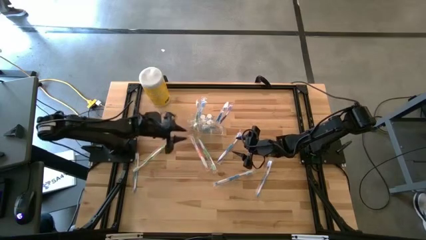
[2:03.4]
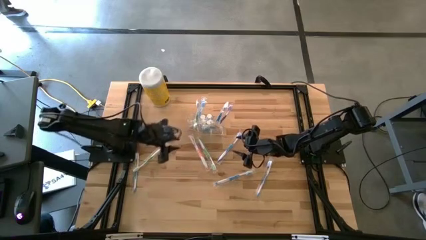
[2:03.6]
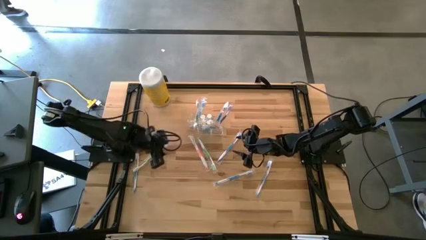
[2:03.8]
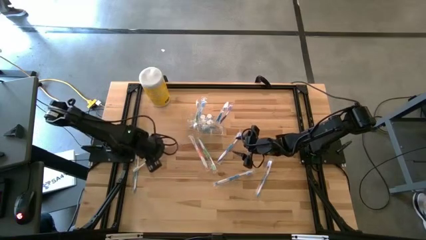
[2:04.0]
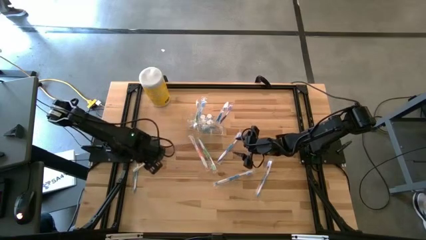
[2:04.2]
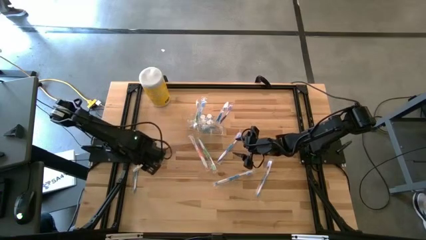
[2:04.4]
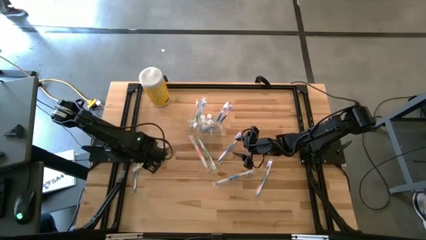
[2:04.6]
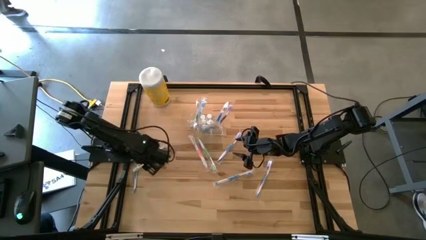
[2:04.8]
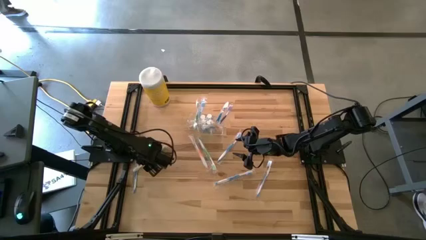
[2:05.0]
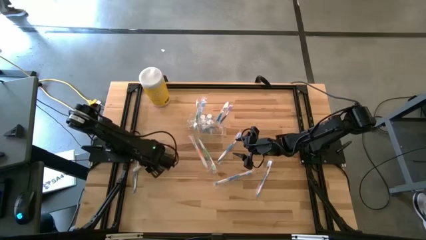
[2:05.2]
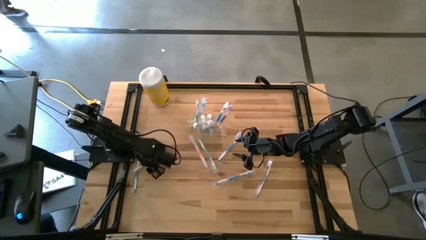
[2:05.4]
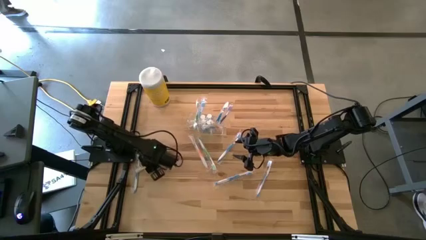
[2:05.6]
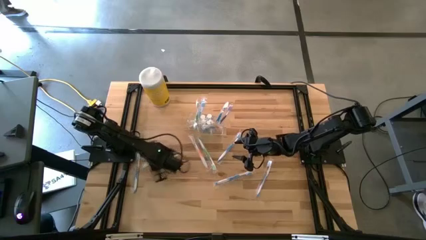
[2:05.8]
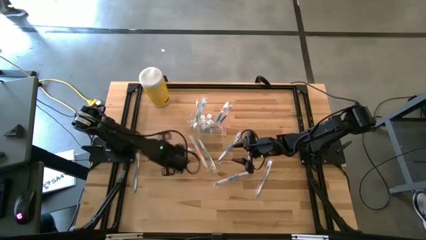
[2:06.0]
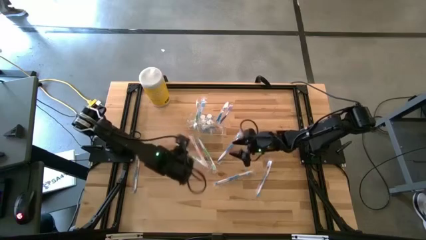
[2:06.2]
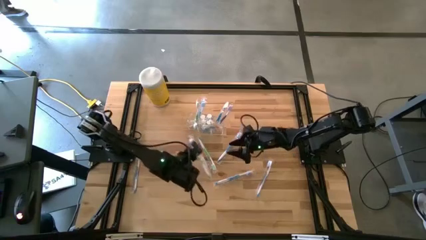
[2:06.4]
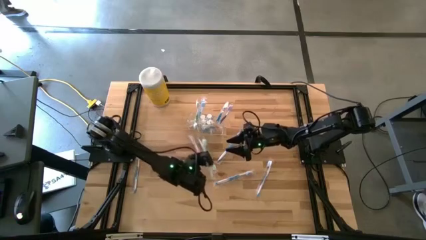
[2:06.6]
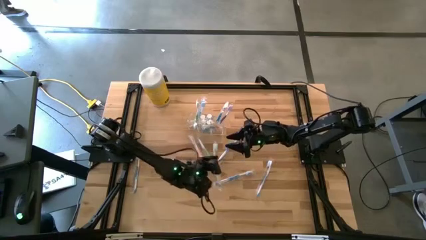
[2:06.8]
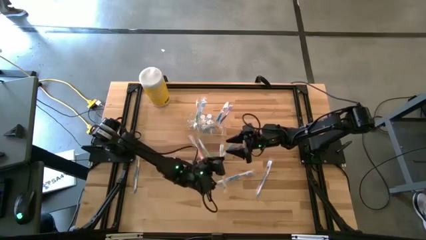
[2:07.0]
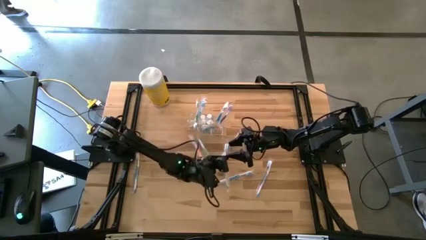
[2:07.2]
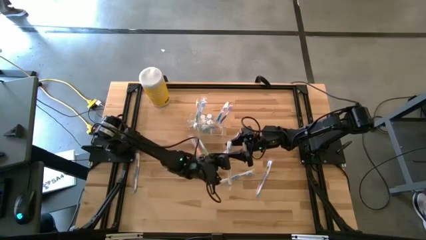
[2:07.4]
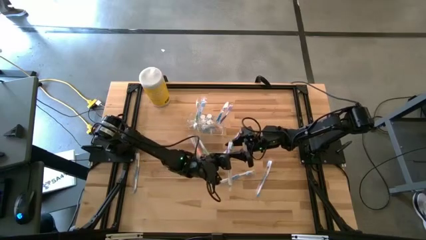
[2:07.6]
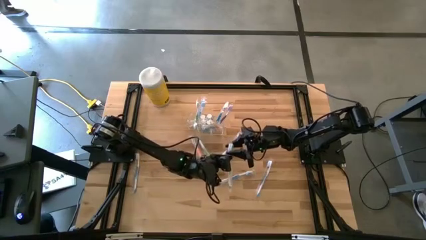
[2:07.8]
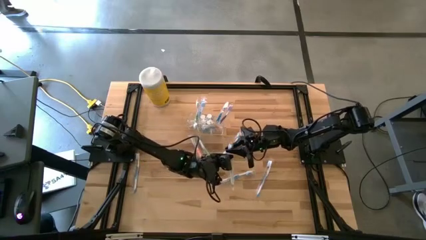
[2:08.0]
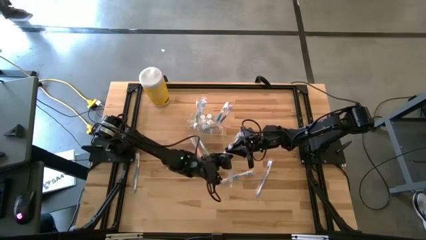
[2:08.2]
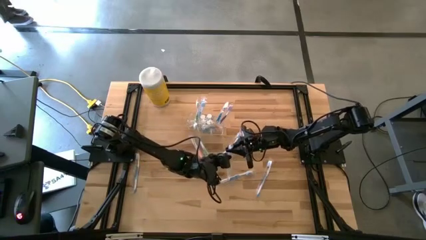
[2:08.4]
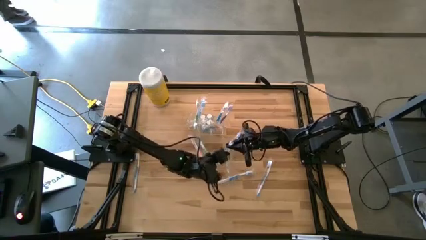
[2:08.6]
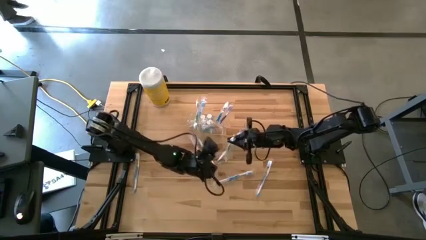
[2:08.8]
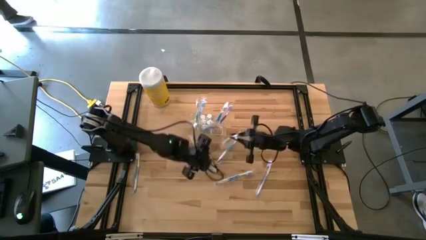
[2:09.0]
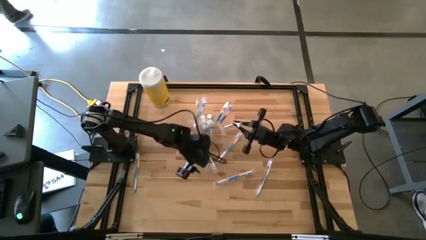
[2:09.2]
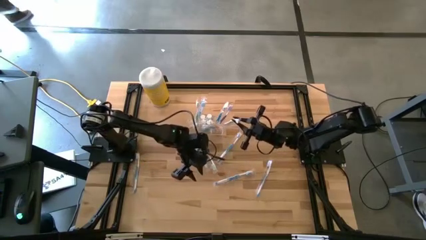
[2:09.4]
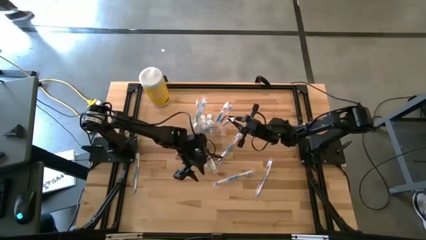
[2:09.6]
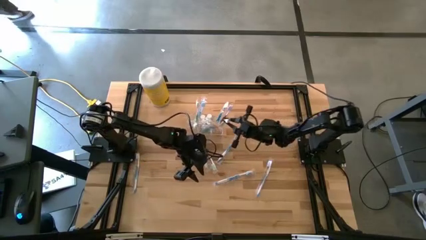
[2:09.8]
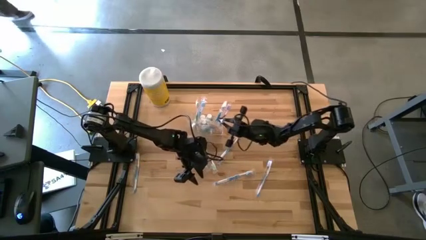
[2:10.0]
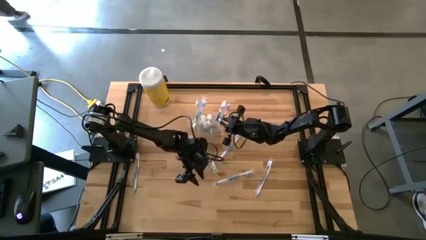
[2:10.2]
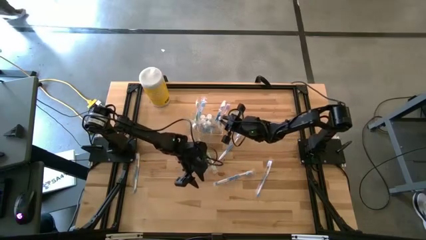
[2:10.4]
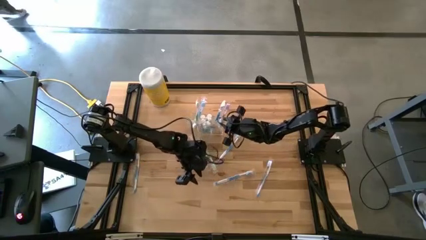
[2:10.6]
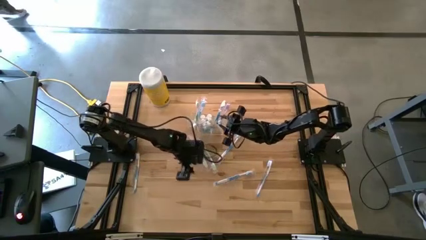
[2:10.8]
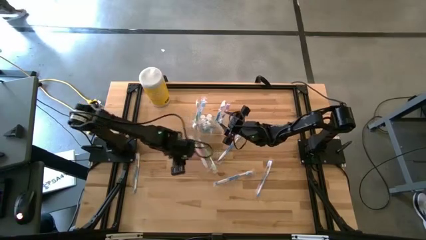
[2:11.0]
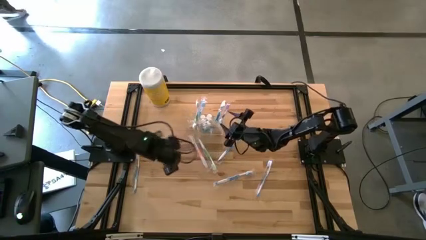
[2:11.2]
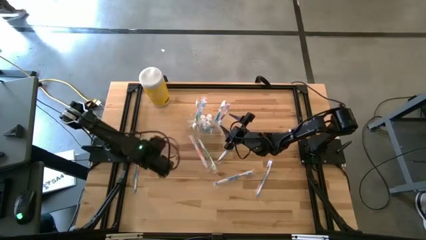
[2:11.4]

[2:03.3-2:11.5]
Task: Pick & Place toothbrushing station
Put the green toothbrush into the transparent organizer

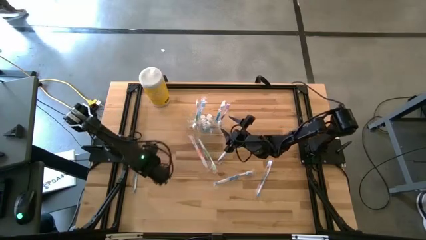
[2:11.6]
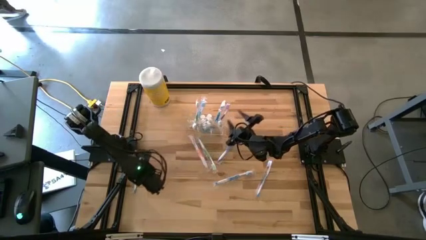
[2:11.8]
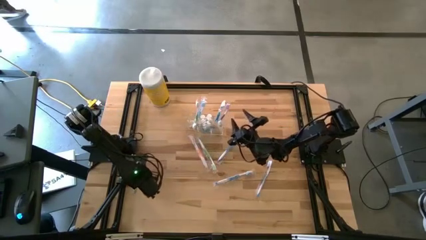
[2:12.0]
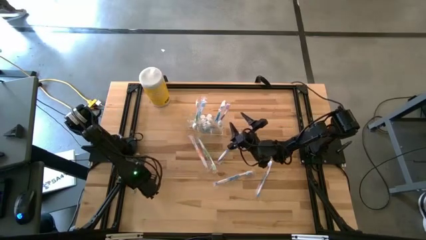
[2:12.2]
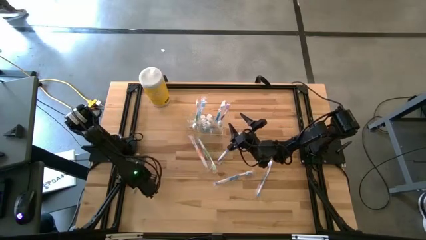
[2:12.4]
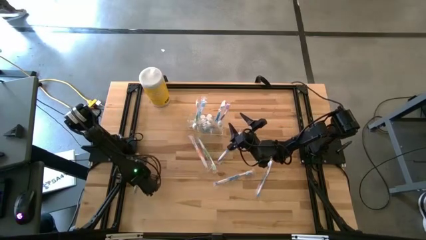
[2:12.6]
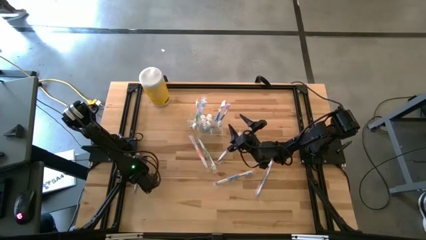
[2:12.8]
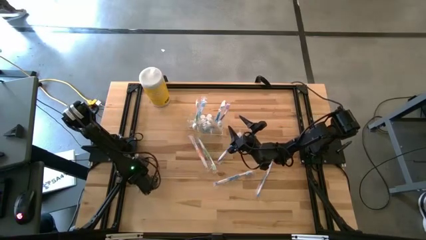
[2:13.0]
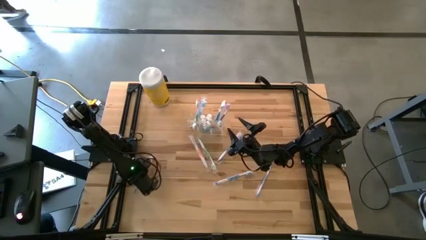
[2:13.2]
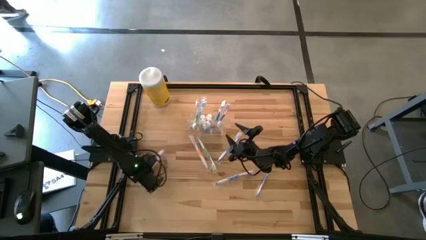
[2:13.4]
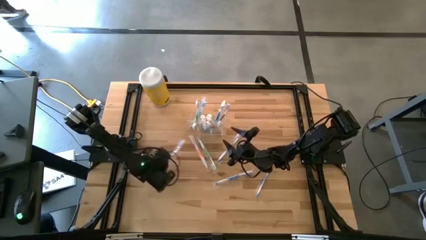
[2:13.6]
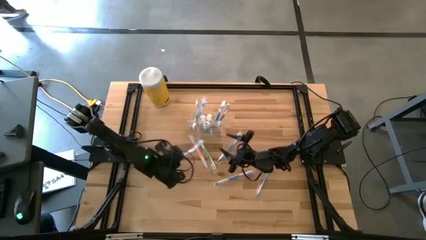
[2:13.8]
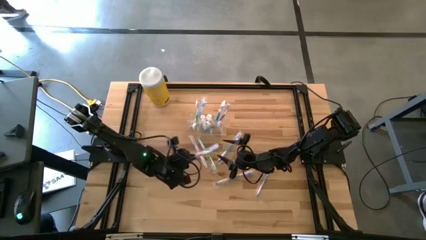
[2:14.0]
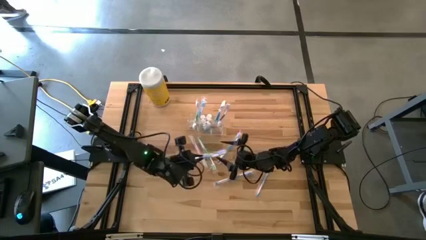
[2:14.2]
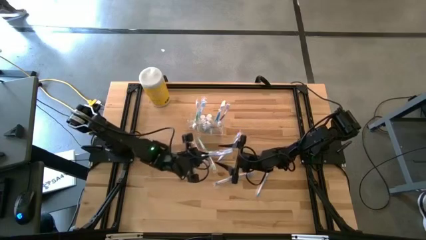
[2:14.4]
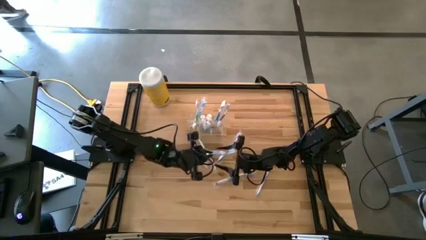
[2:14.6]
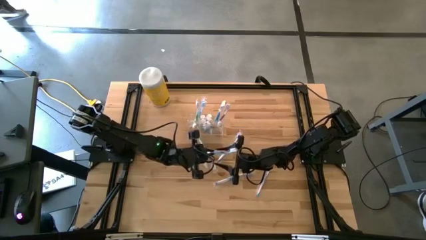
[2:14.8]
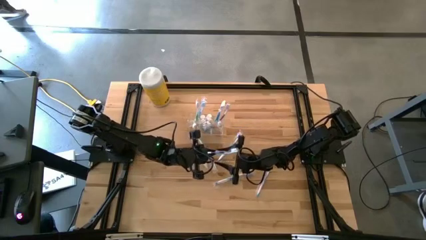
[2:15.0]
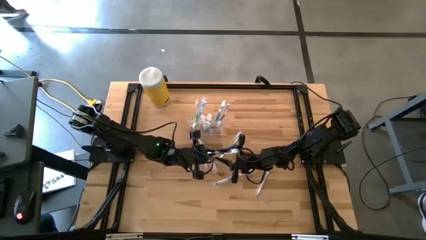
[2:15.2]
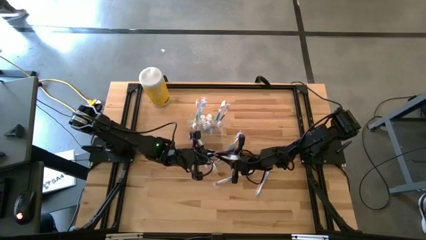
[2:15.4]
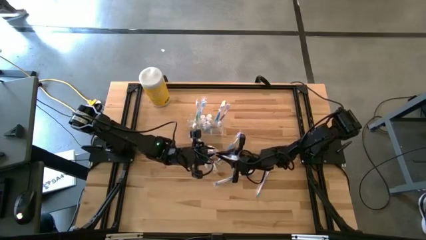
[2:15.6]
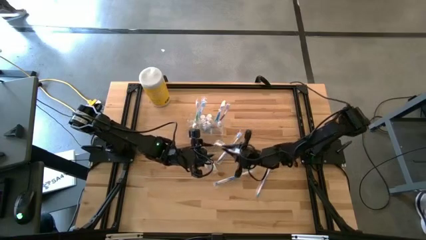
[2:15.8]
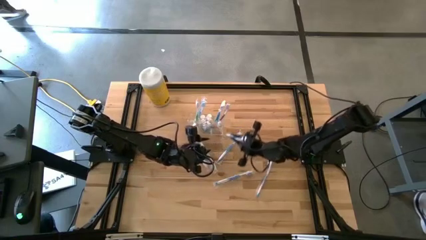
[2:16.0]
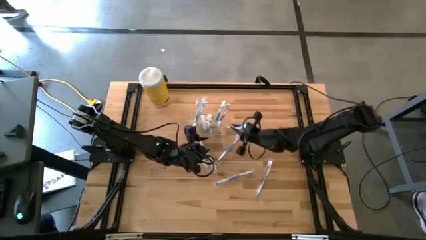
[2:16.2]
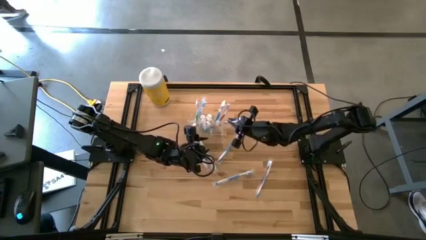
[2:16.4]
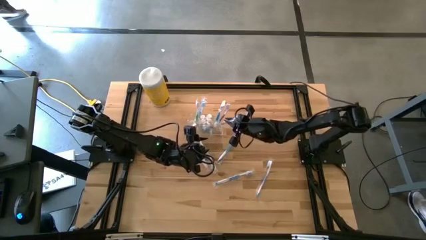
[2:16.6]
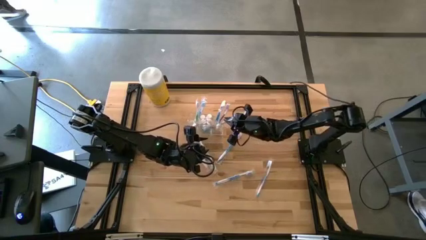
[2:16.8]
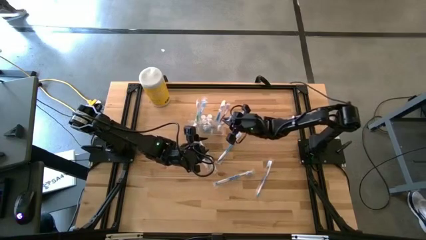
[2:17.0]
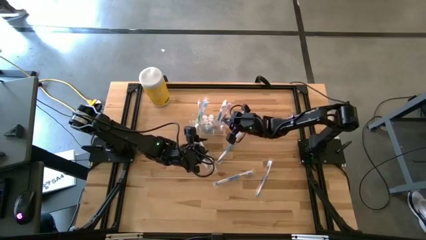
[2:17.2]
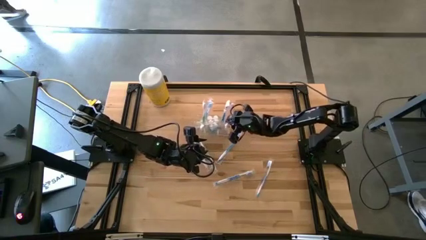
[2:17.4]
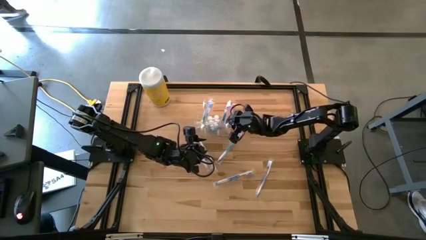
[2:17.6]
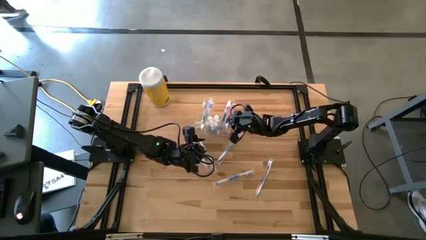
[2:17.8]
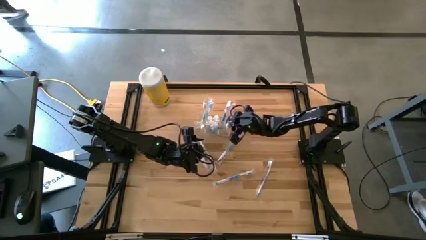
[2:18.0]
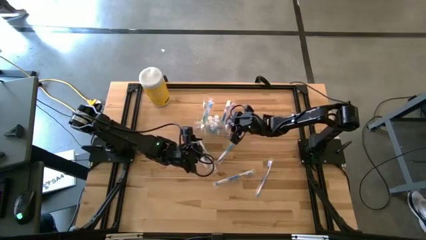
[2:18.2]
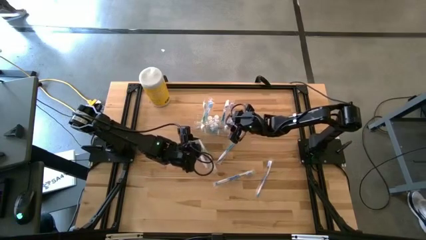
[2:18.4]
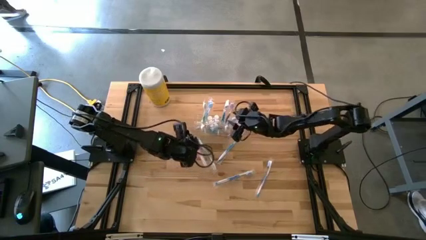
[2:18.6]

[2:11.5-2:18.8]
Put the blue toothbrush into the transparent organizer

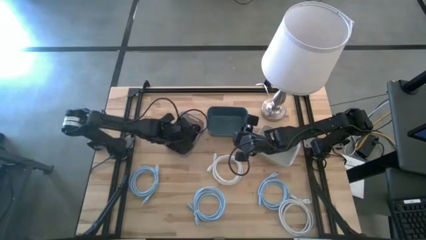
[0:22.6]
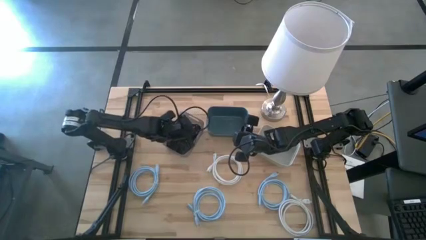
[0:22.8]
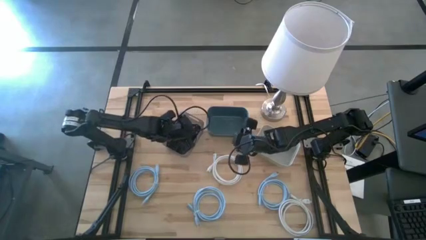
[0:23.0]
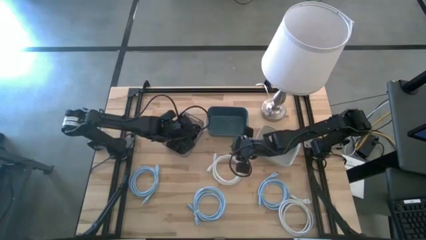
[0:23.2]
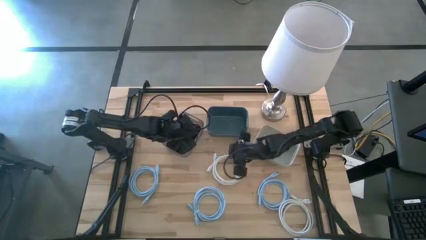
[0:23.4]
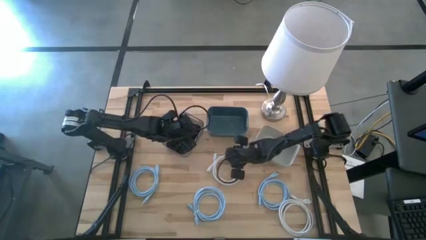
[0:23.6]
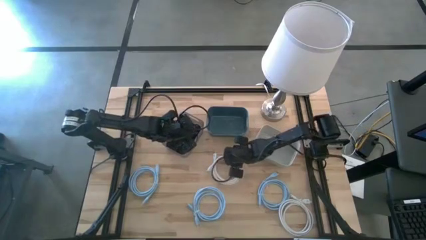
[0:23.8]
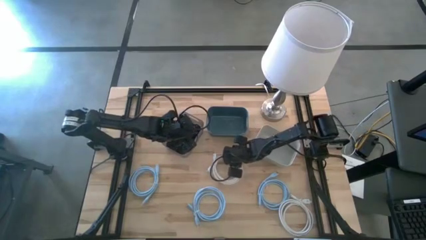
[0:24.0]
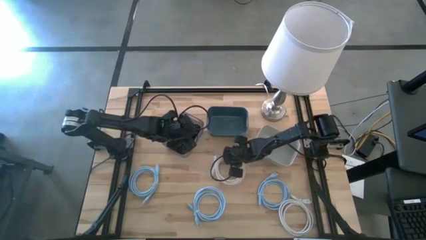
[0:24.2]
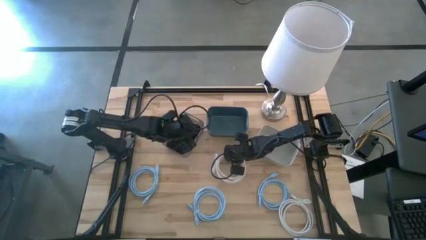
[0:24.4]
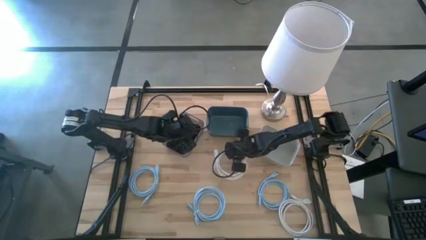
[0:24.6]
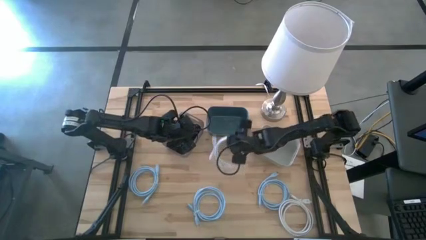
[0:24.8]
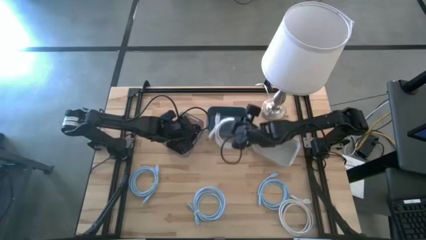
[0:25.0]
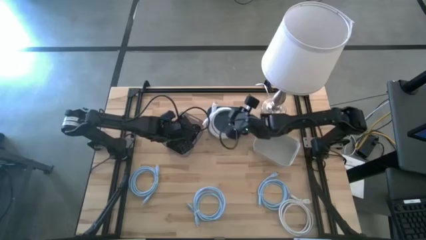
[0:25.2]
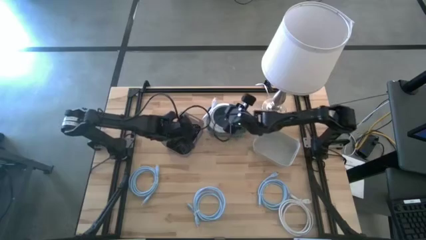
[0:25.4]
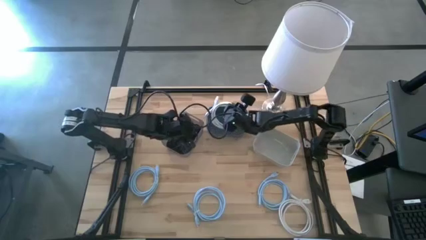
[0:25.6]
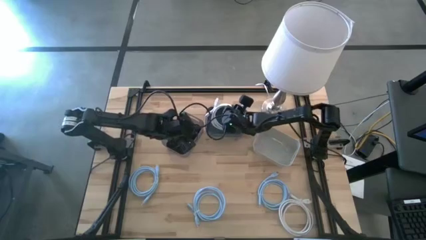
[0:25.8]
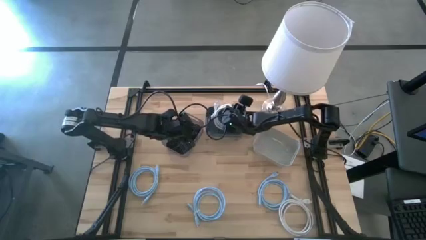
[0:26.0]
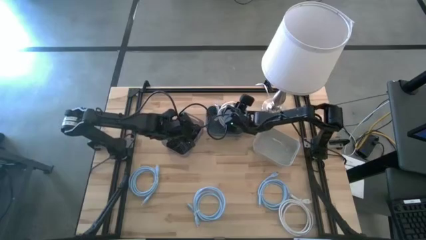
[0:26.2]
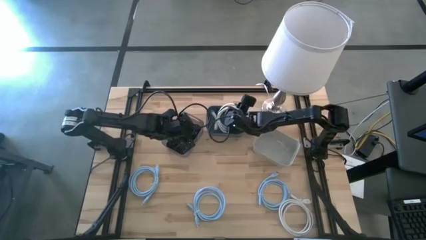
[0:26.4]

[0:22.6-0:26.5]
Task: Sort HDMI cables
Put the top white HDMI cable into the blue bin
